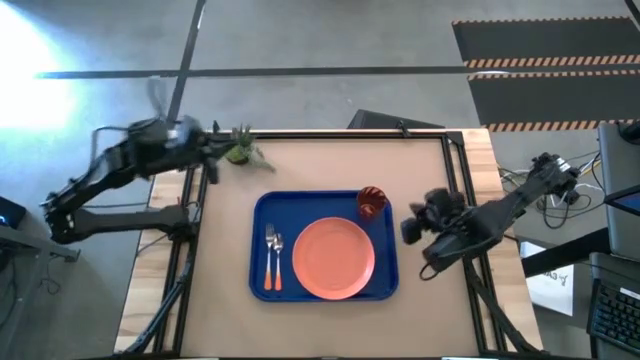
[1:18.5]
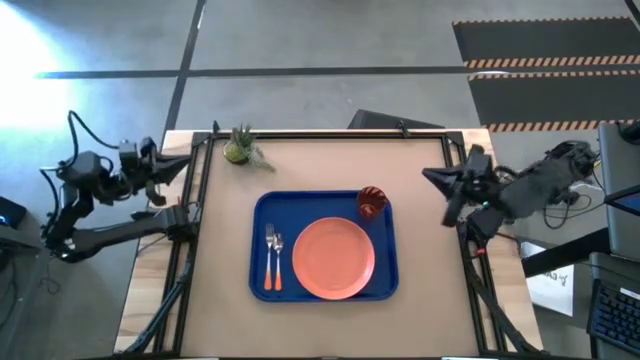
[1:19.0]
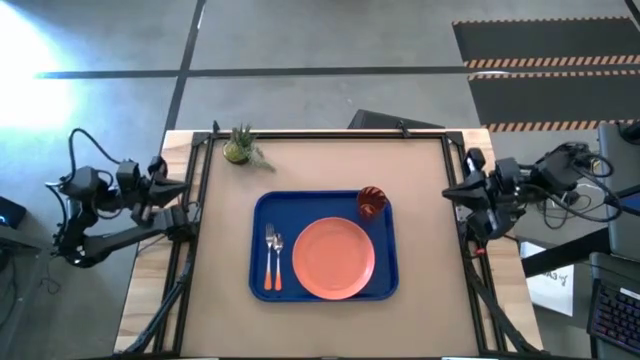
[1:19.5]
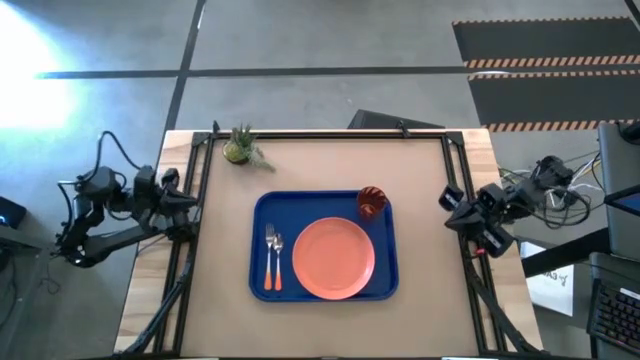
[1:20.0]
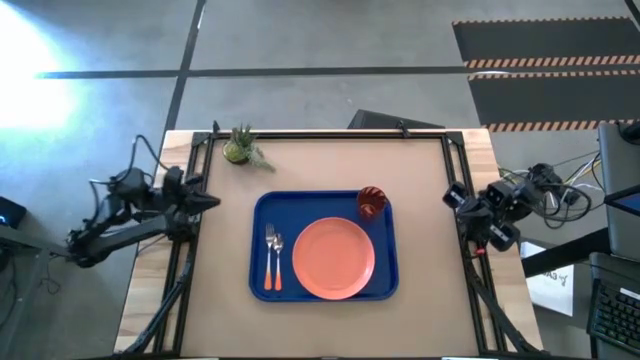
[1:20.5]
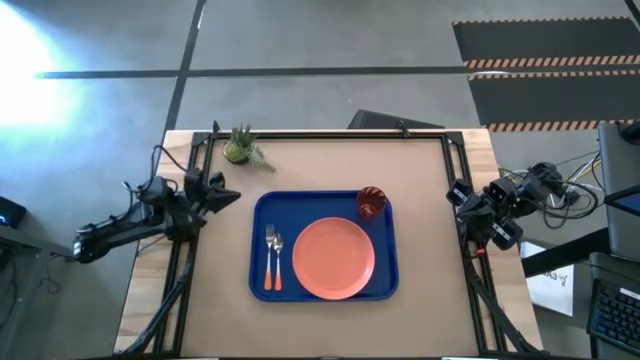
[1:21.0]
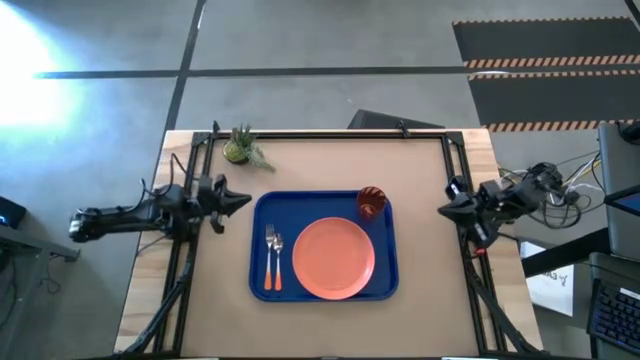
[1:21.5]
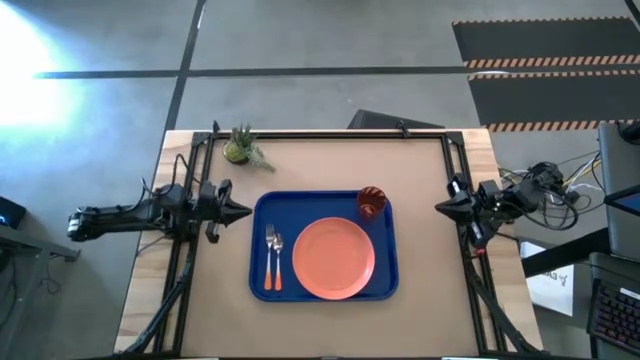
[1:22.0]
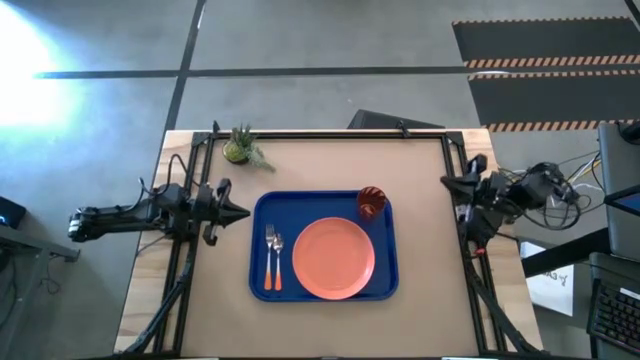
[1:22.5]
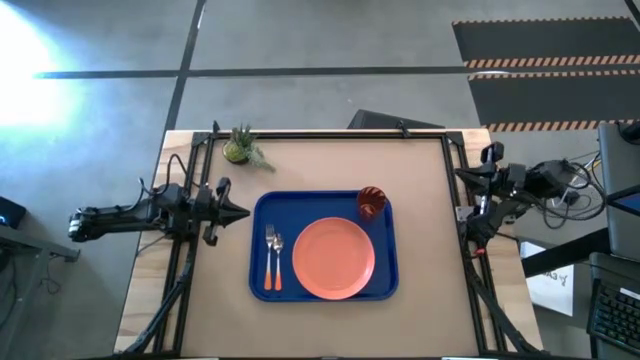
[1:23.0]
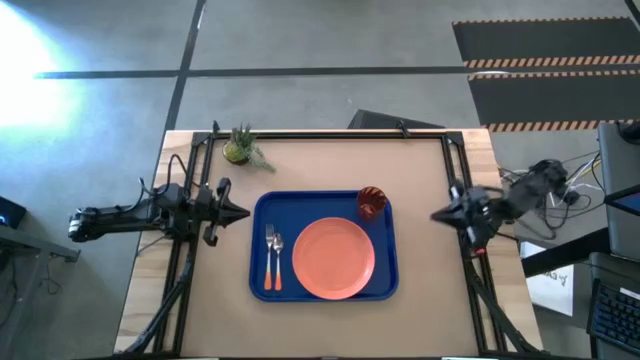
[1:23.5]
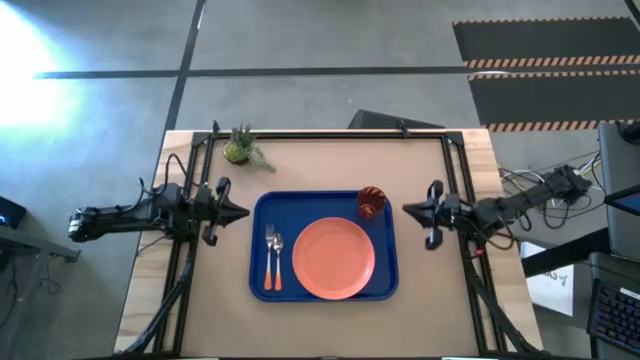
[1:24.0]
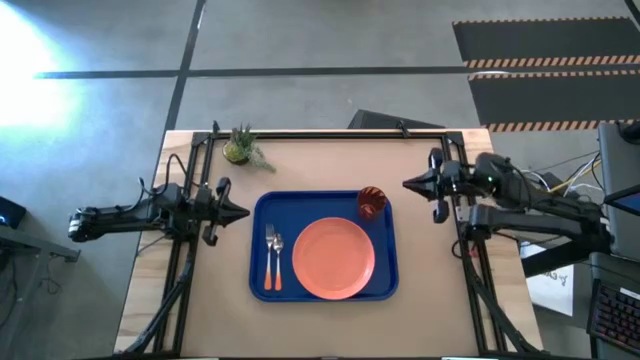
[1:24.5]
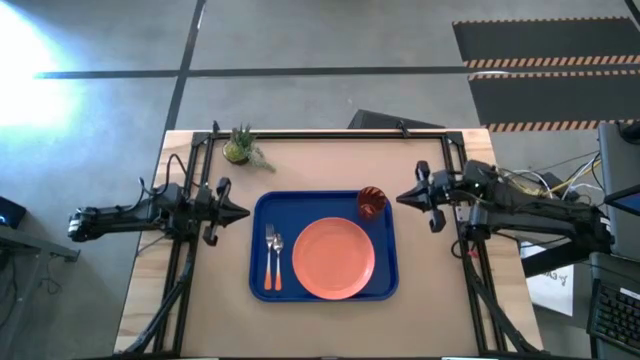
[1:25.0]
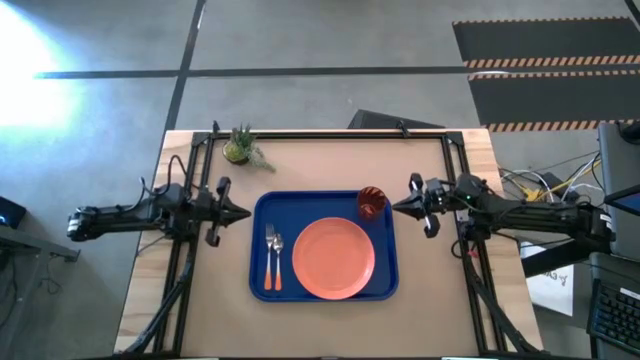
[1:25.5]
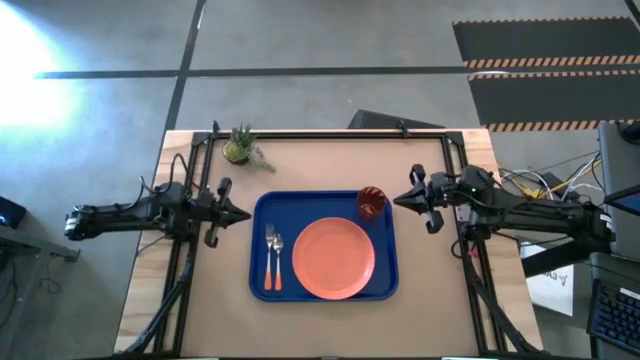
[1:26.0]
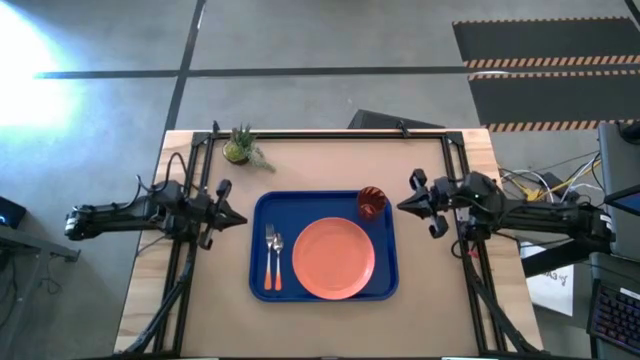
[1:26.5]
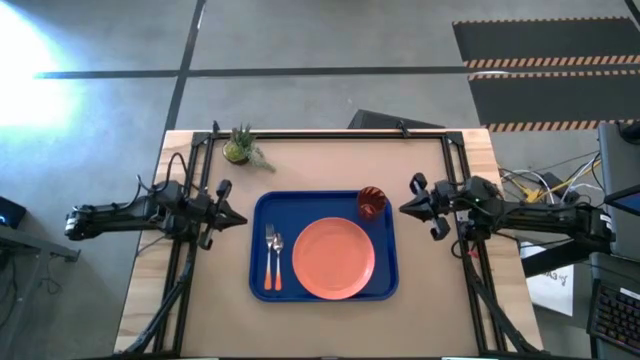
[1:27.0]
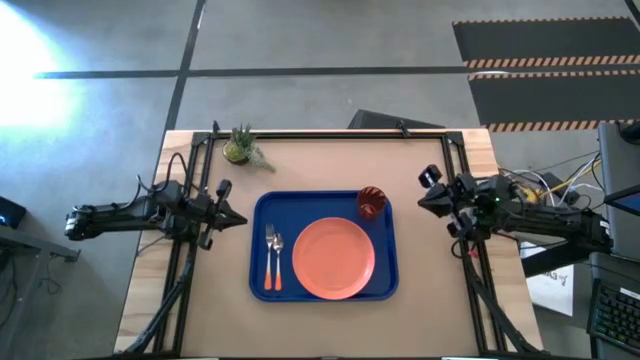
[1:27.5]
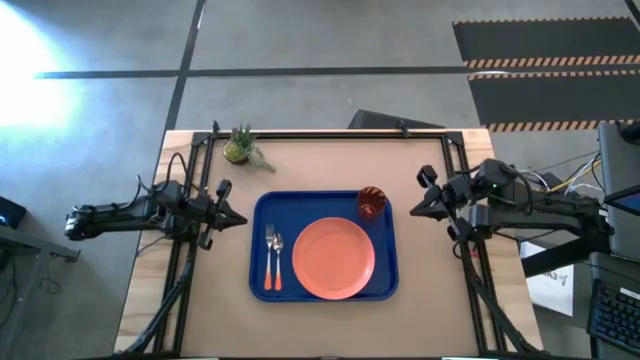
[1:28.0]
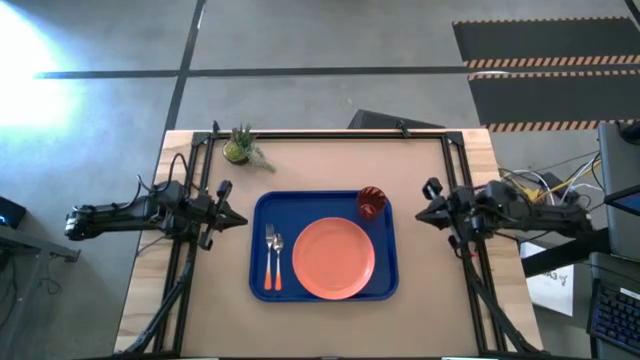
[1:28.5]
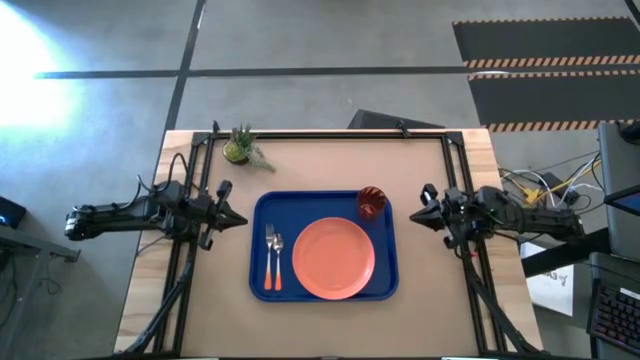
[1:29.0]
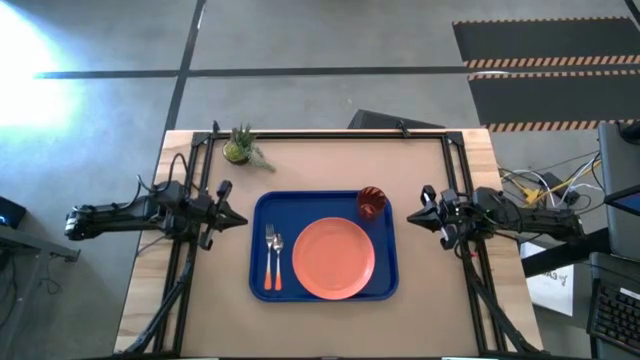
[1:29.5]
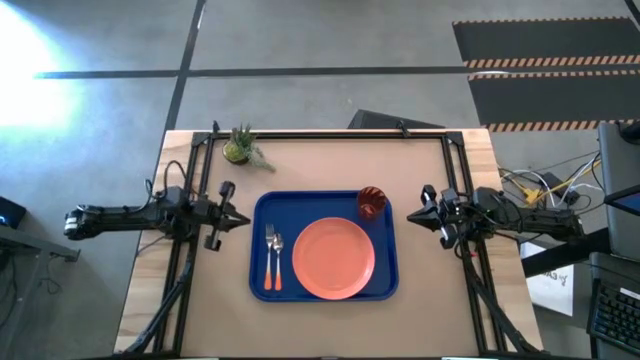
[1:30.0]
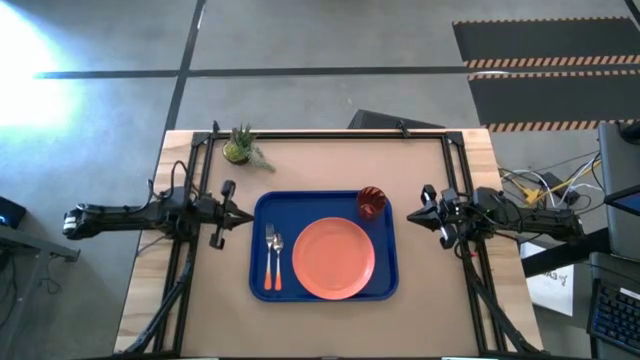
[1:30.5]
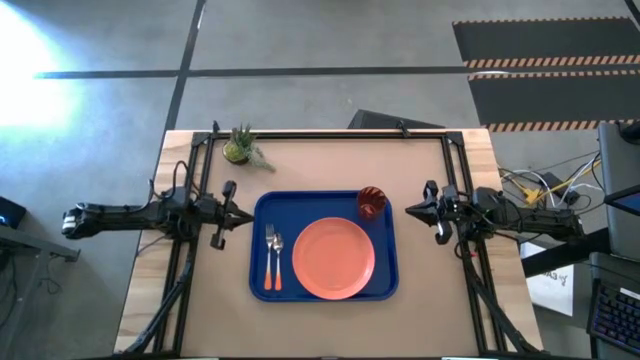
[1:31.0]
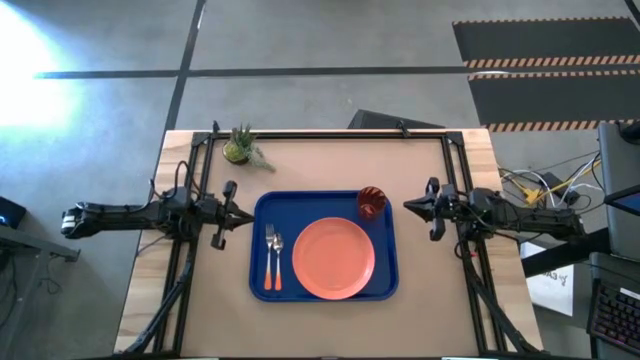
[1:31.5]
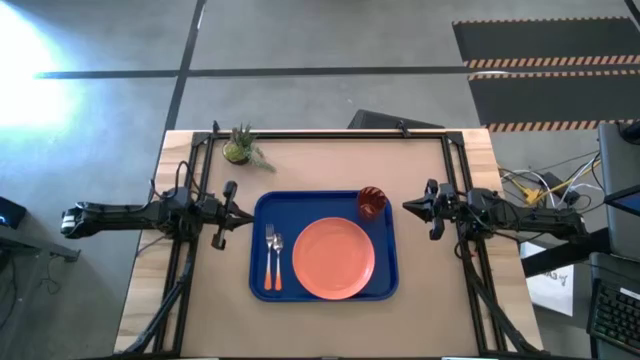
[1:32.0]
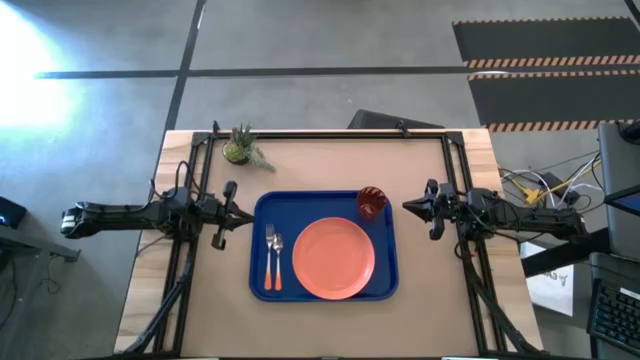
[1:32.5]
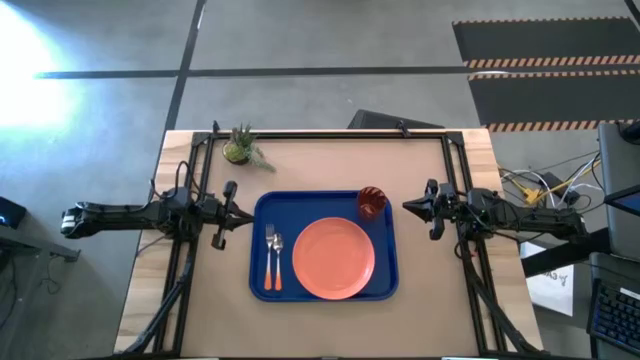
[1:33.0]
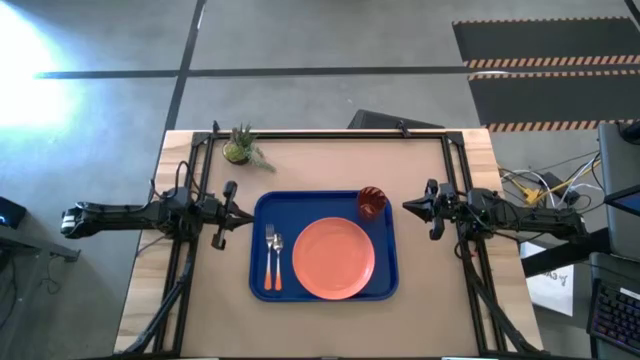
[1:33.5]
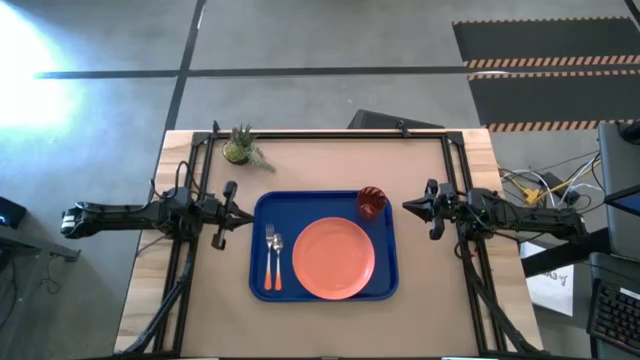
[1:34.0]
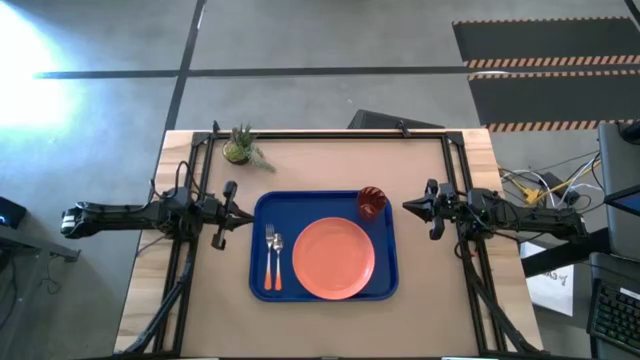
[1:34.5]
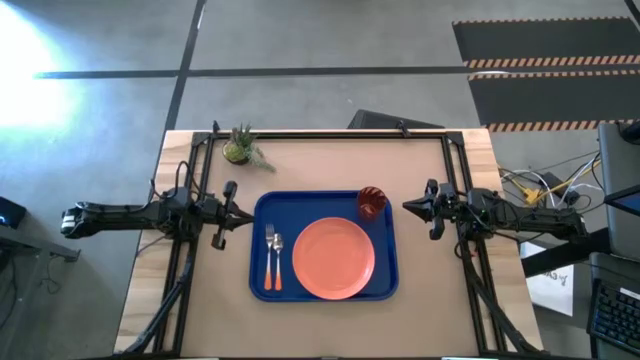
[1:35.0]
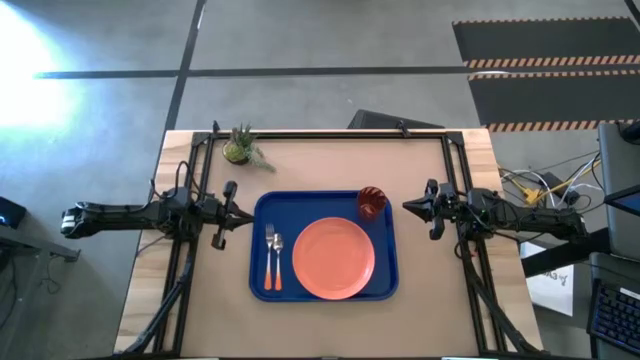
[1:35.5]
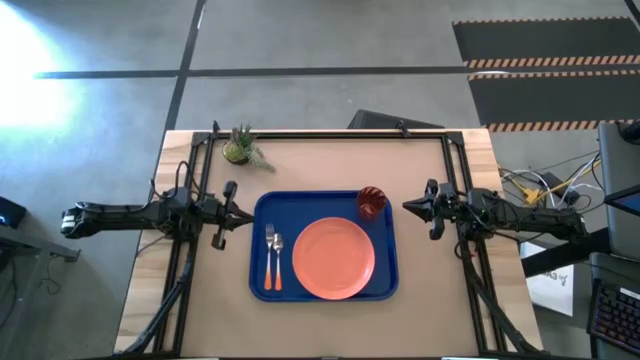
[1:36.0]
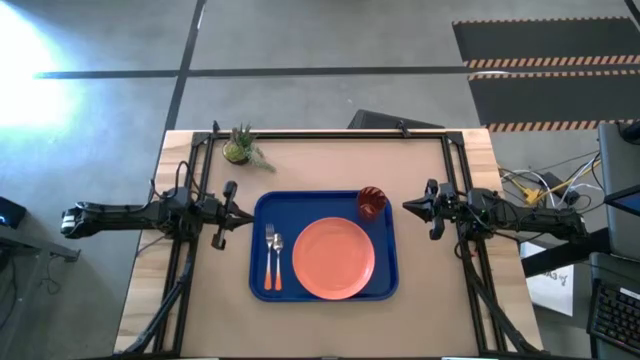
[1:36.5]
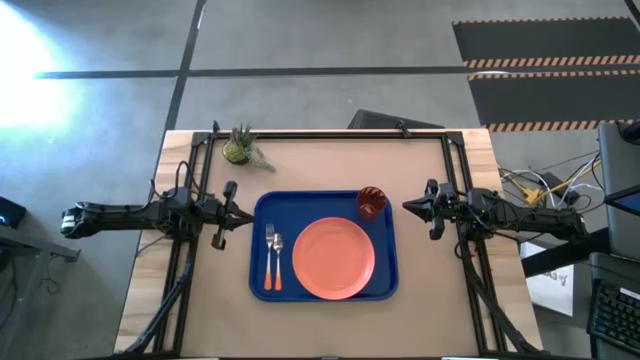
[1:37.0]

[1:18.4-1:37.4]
Task: Pick and place plate/cup/fork/spoon on tray
Return to Home Position

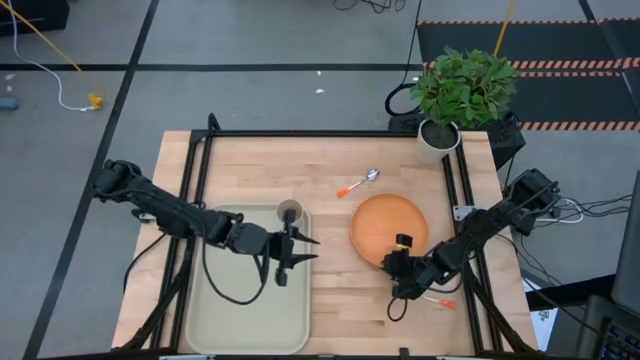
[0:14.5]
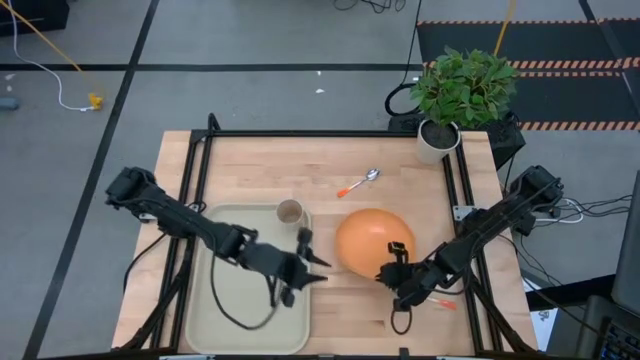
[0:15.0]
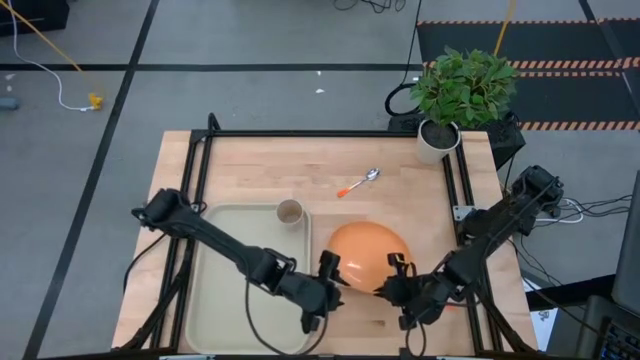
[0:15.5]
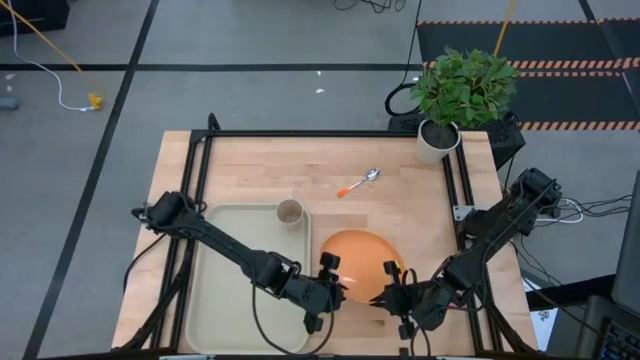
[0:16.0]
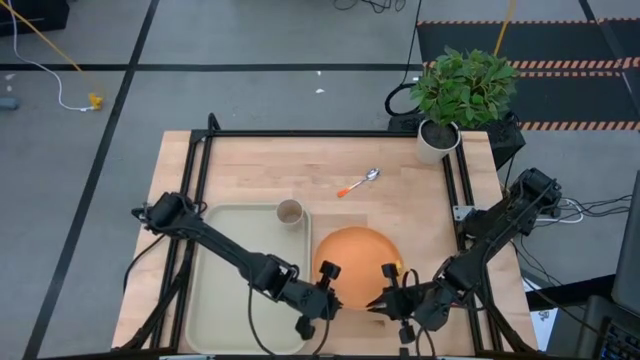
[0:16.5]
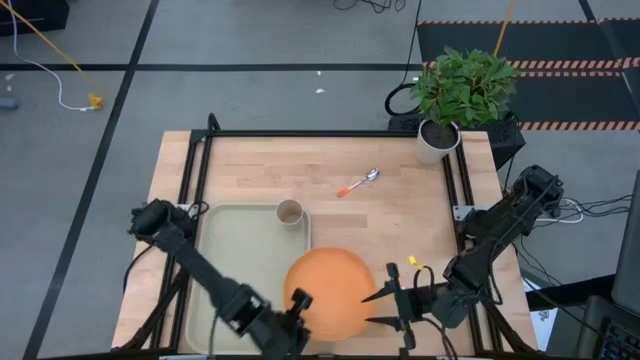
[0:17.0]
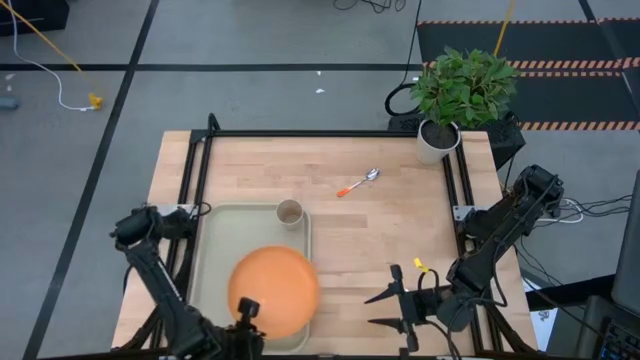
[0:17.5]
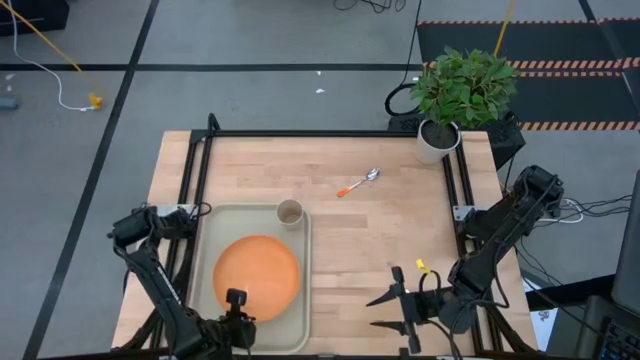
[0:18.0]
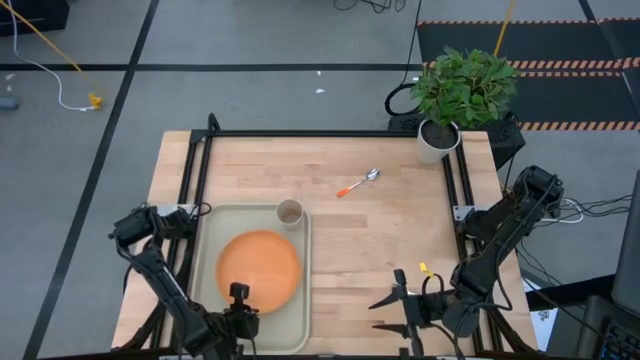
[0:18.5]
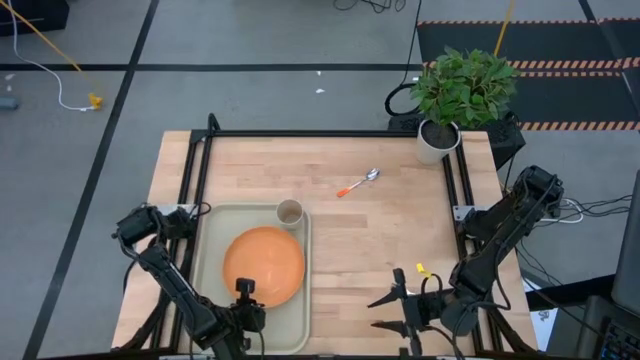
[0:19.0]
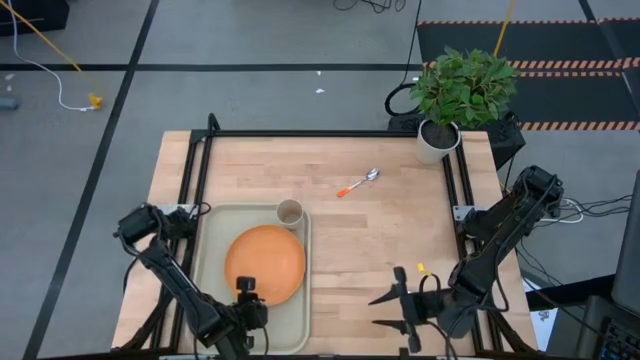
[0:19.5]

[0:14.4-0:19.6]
Task: Pick and place plate/cup/fork/spoon on tray
Put the orange plate on the light yellow tray to the bottom right of the light yellow cup
